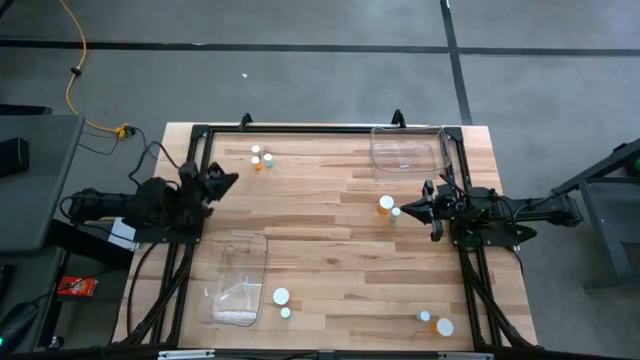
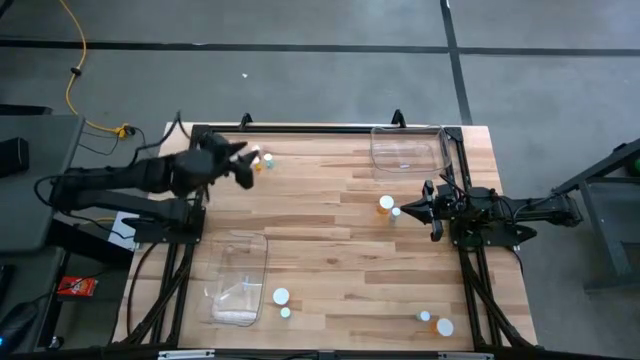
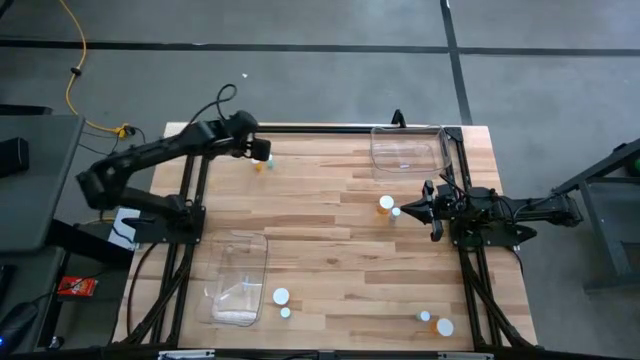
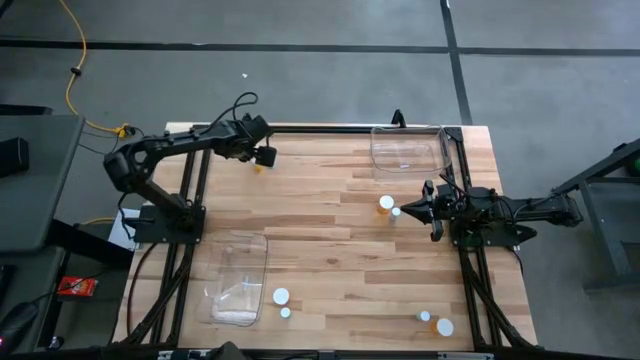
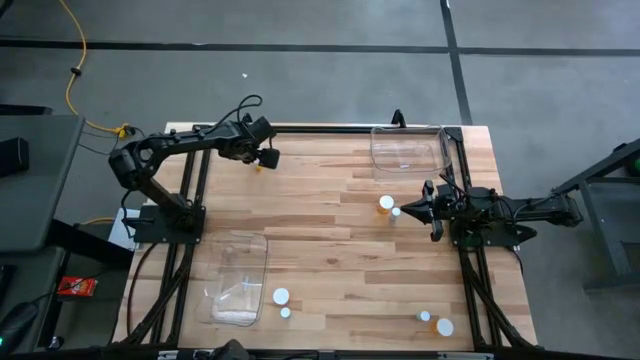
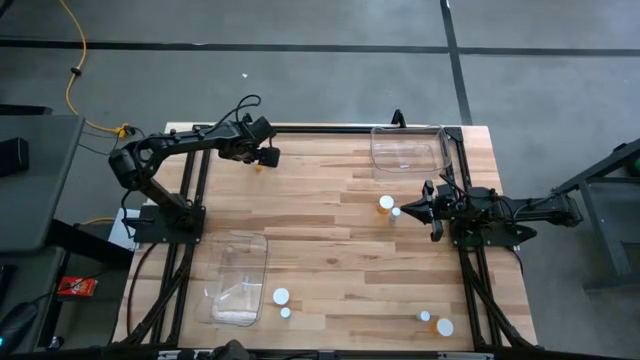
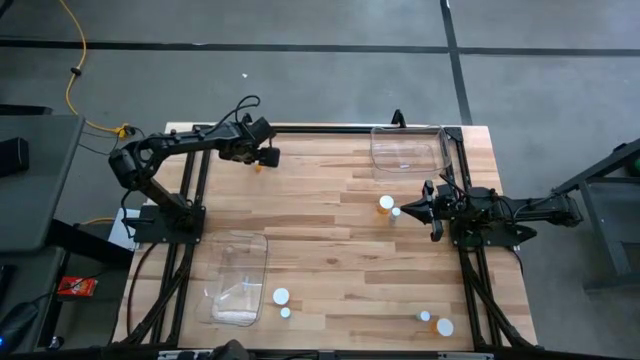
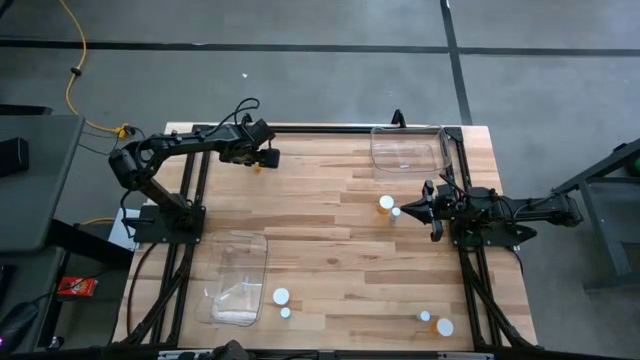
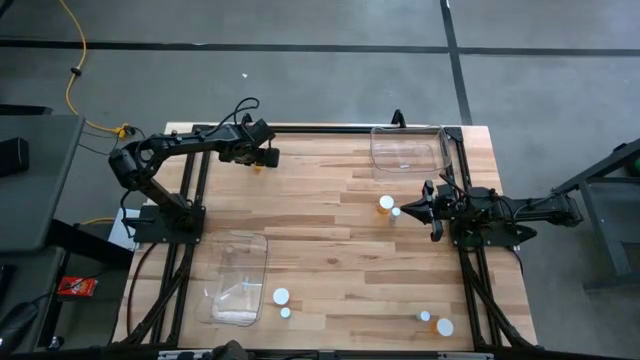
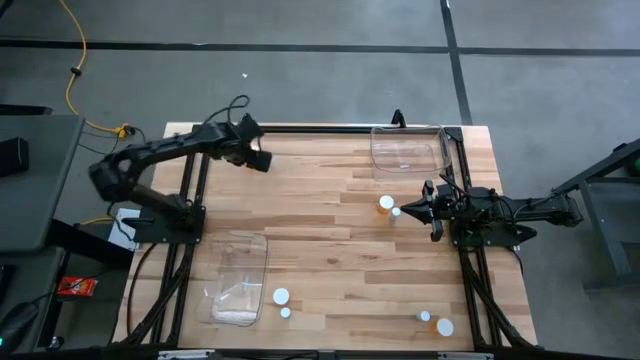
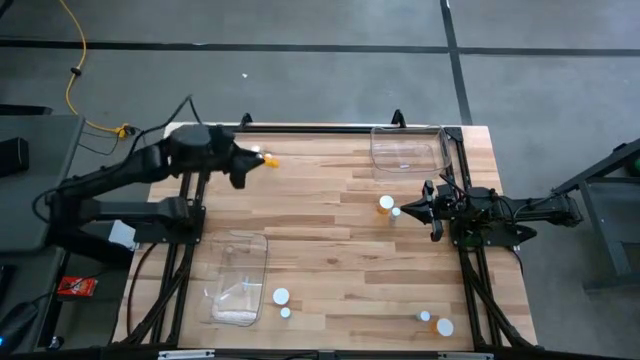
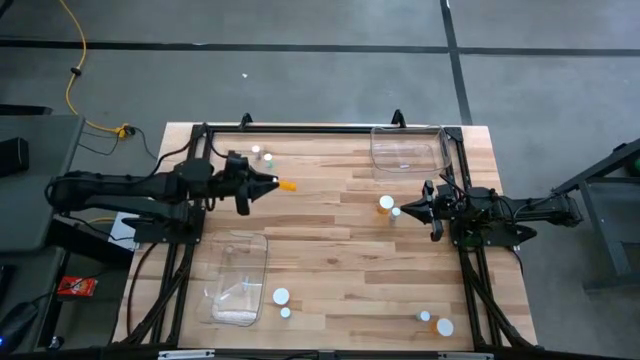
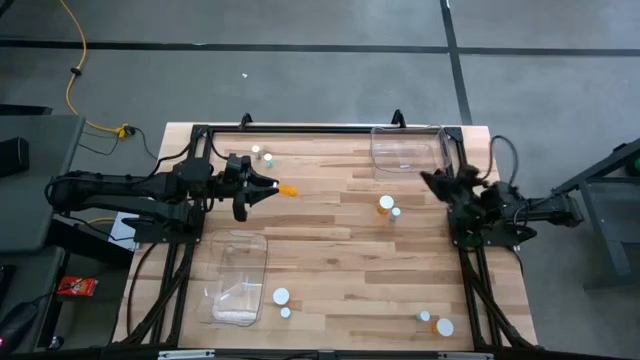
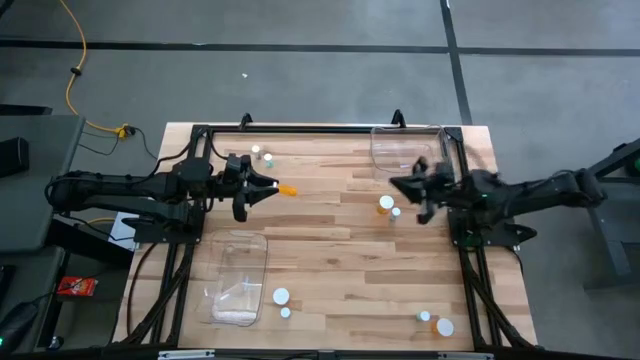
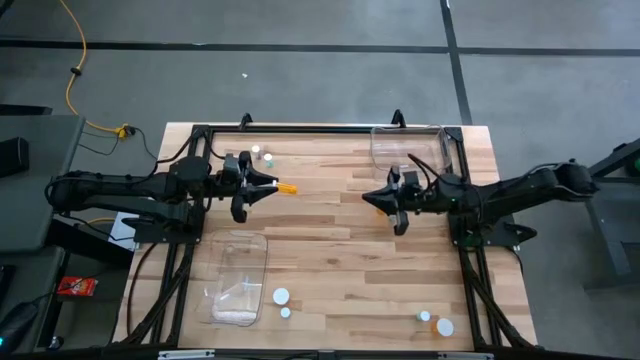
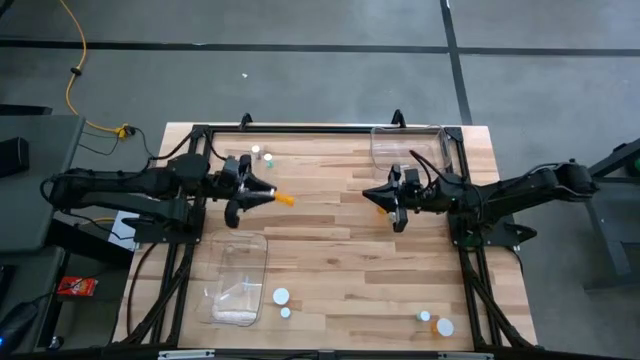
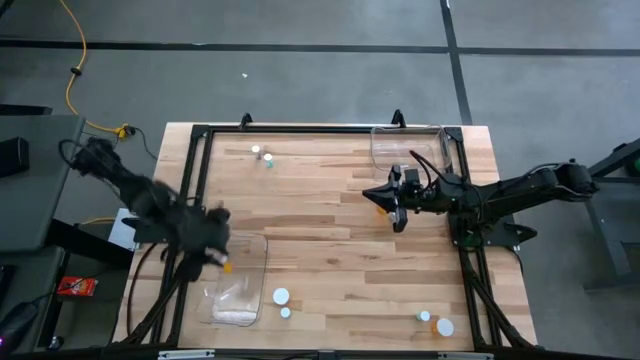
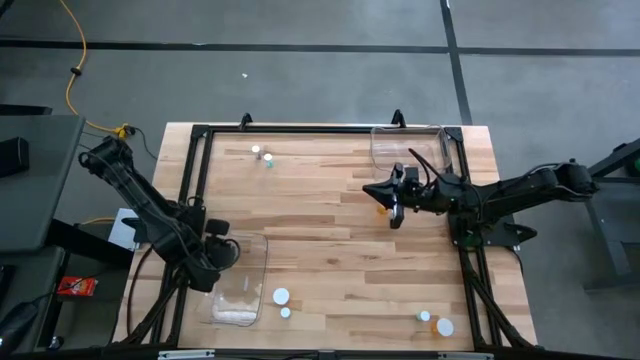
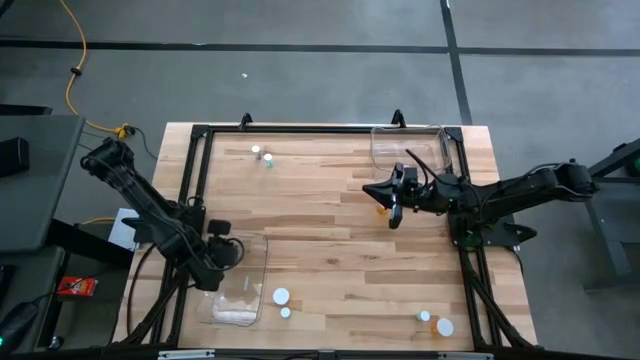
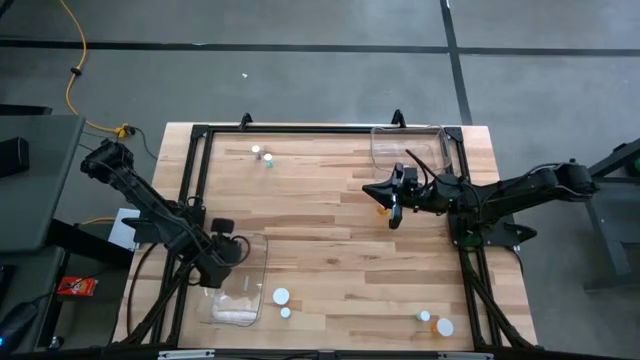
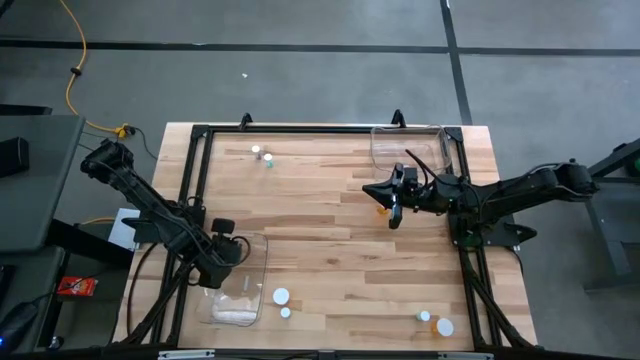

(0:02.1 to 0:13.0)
Task: Pick and place medicine bottles into bin by pill shape (circle, oval)
Put the small orange tablet bottle into the bottom transparent bin

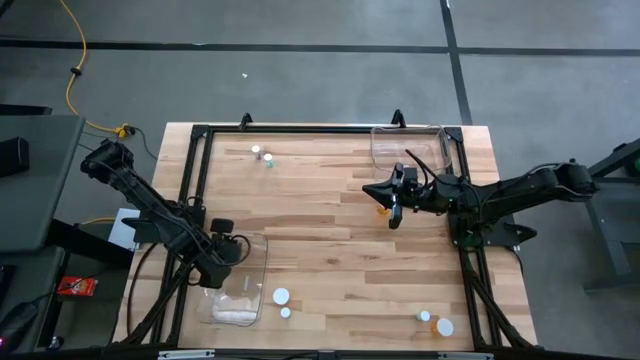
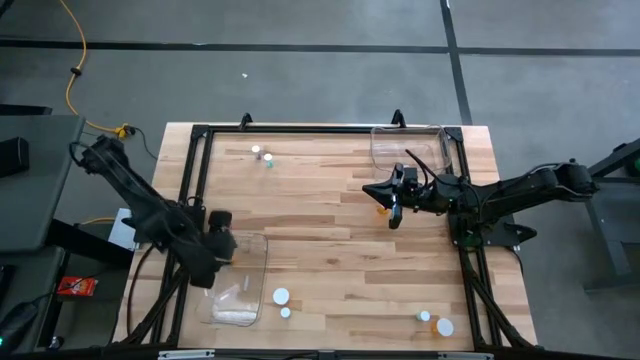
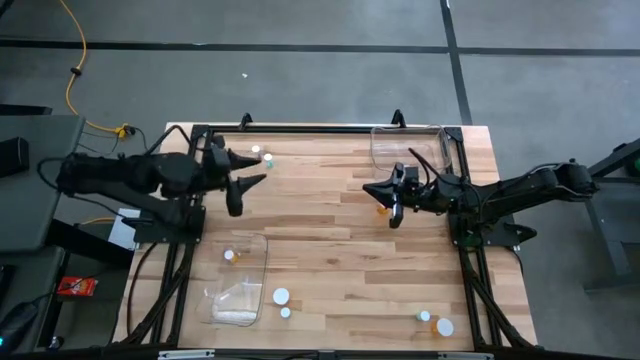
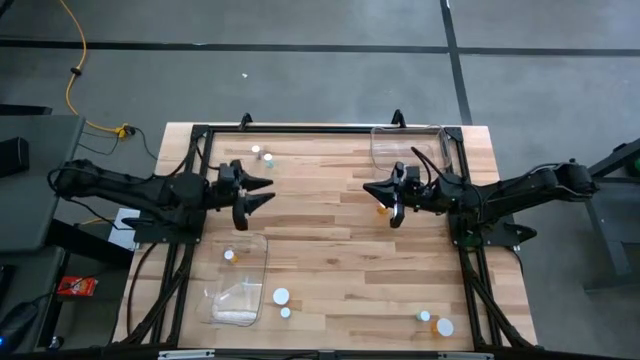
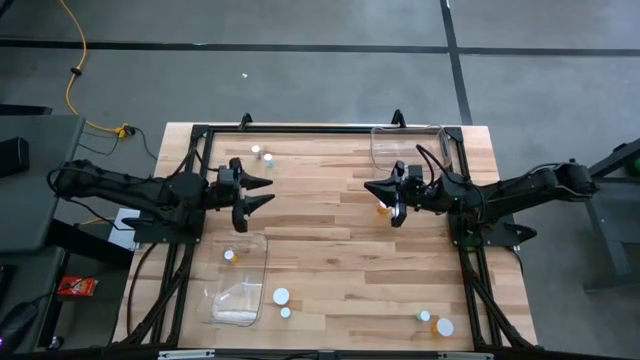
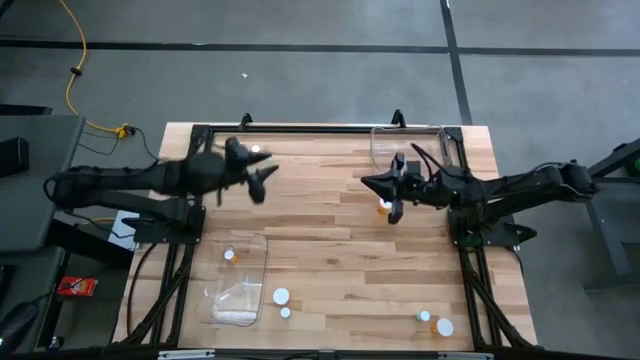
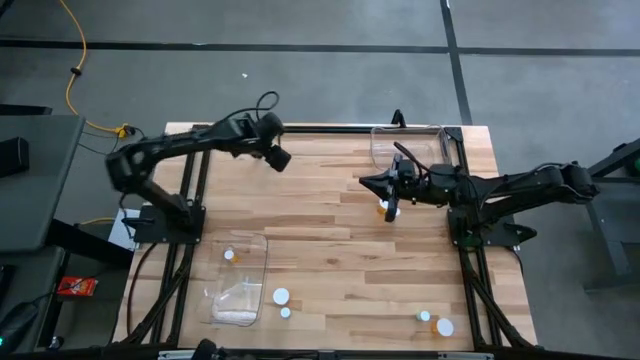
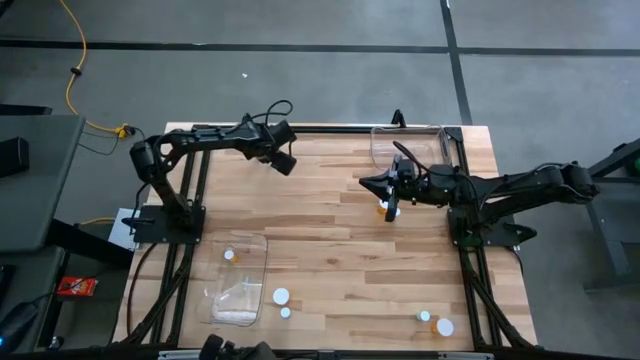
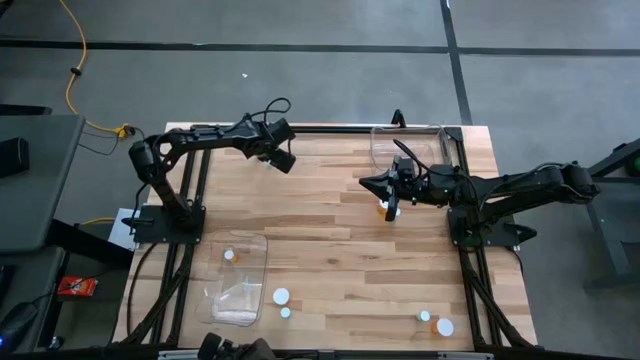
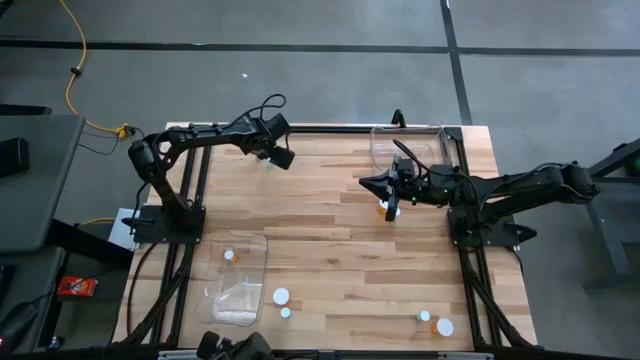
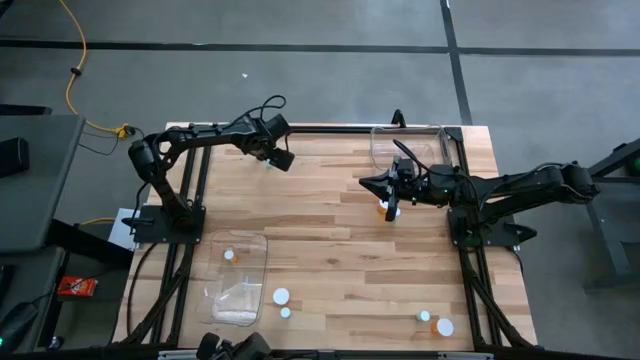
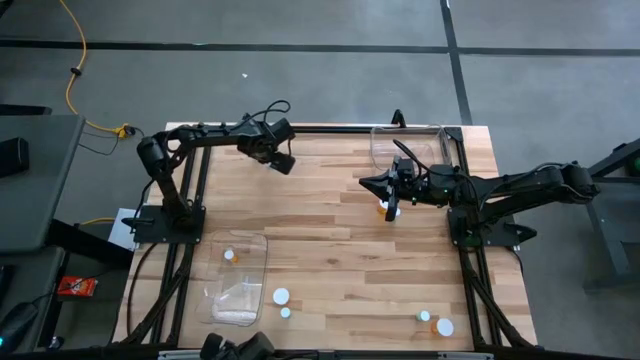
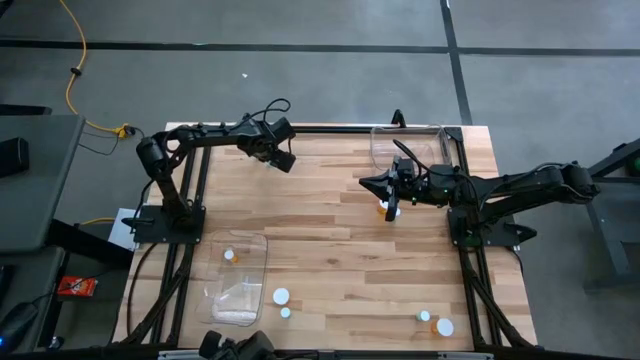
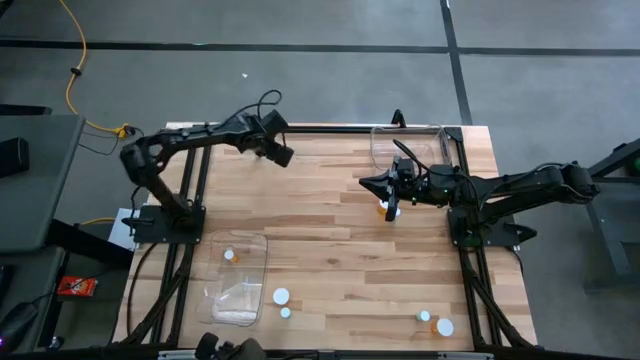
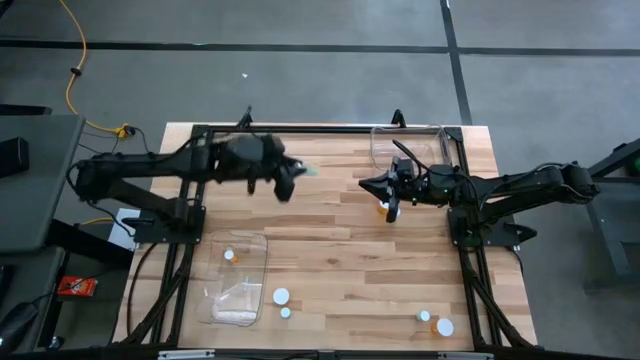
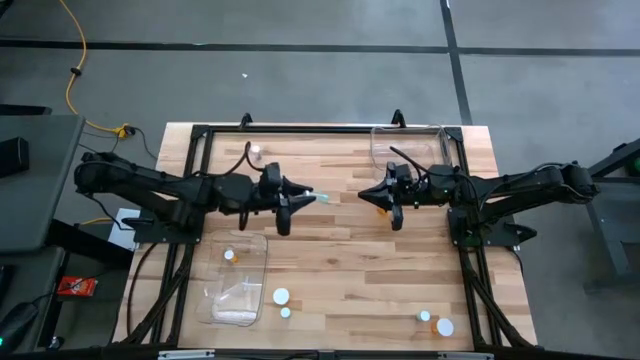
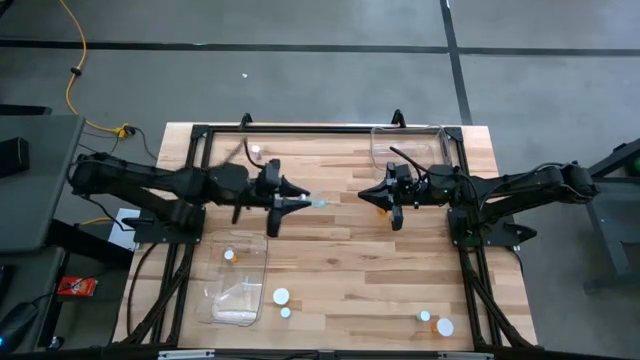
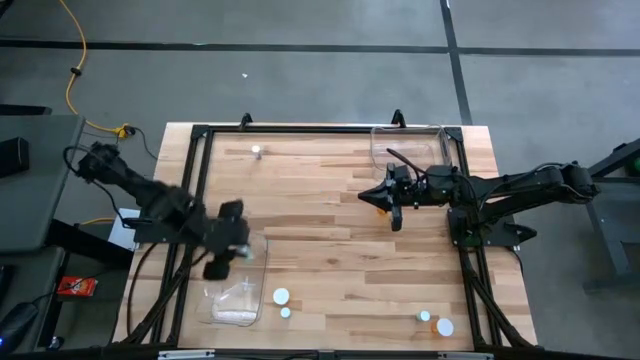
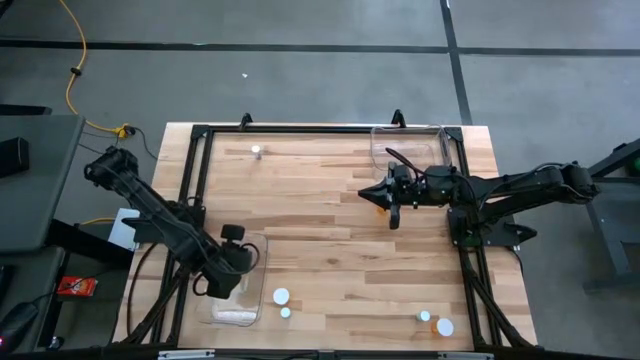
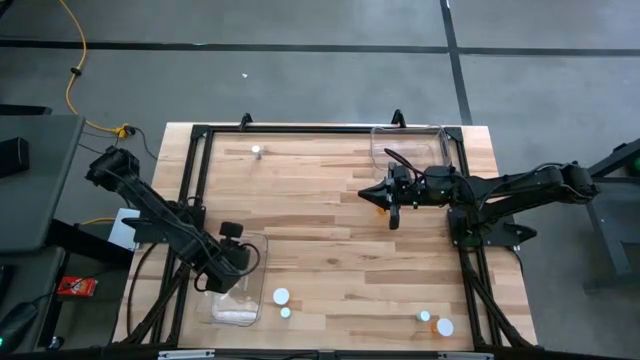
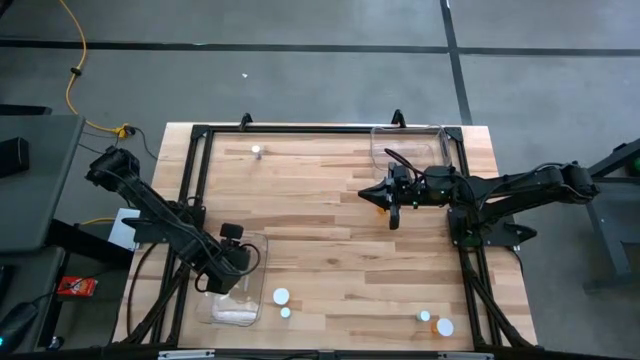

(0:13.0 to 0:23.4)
Put the green tablet bottle into the bottom transparent bin

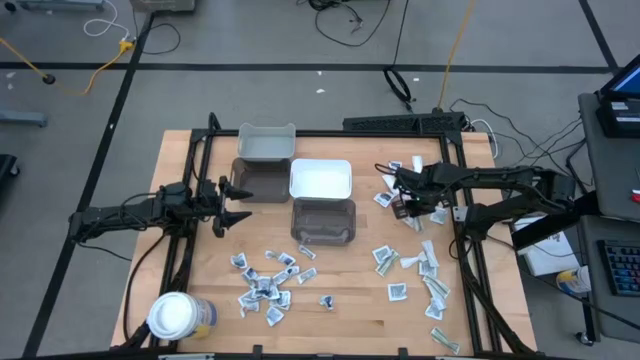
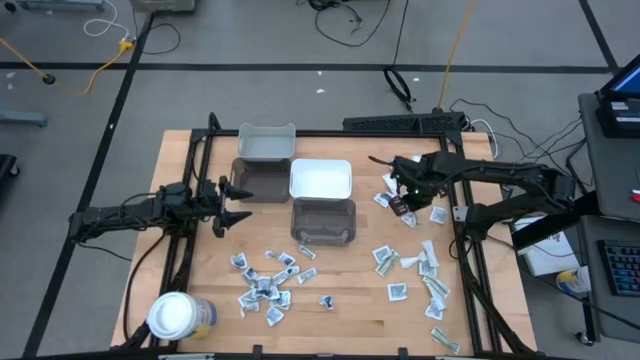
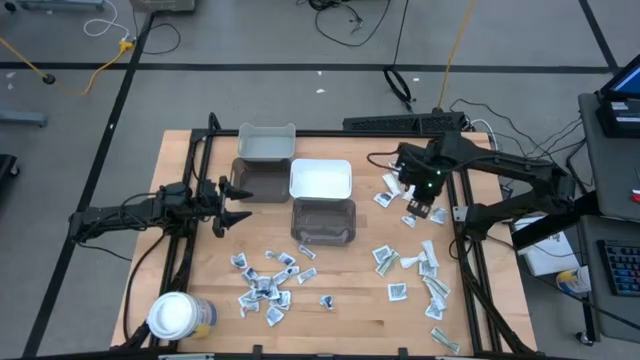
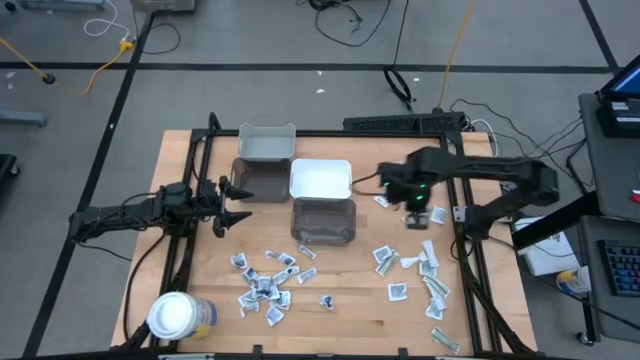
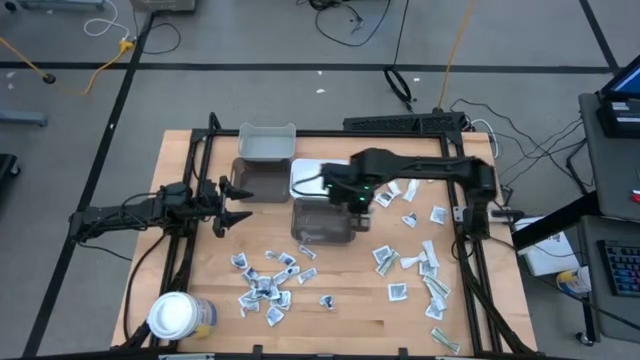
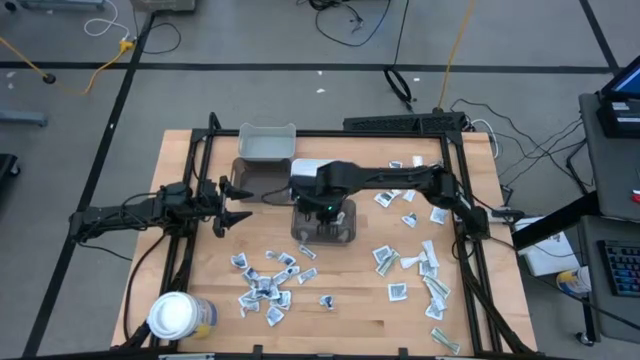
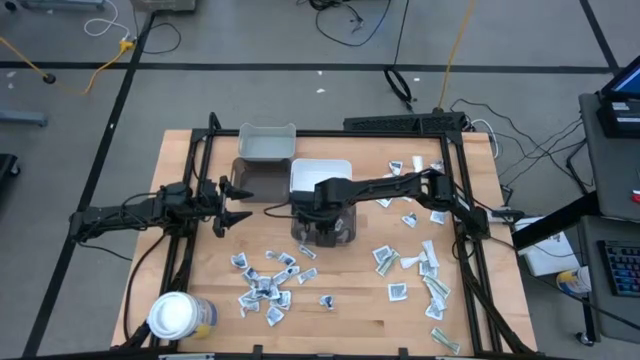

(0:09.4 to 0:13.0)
Task: Pick & Place First Aid Supplies
Put the green bandage pack into the right black bin
